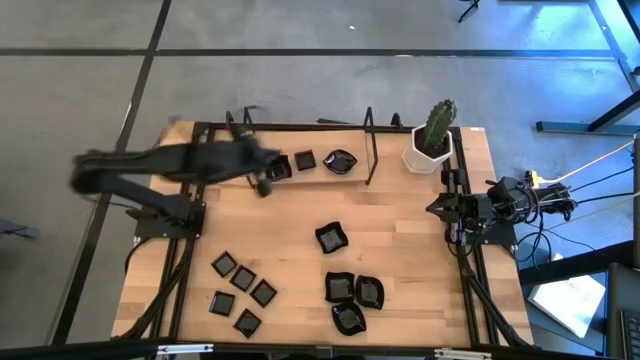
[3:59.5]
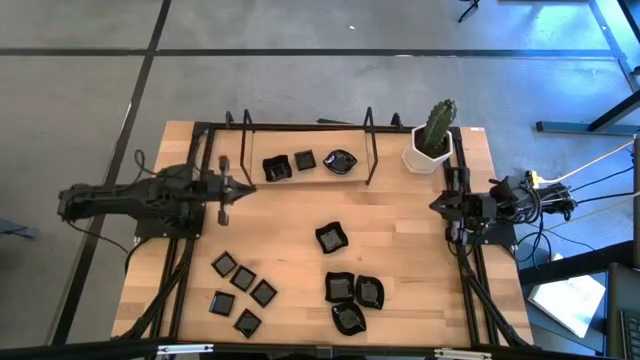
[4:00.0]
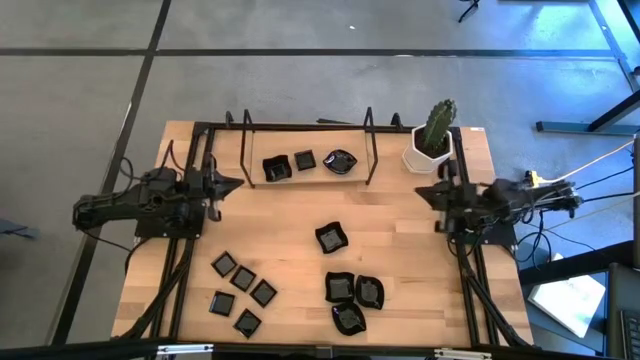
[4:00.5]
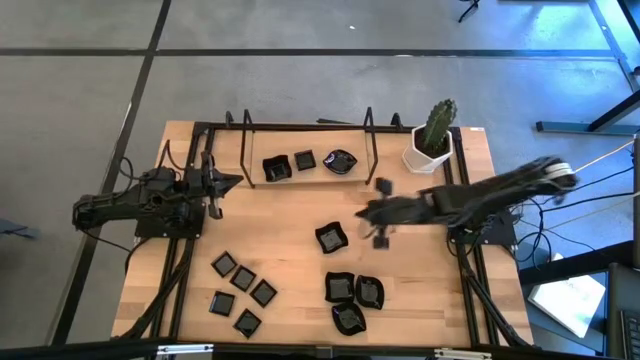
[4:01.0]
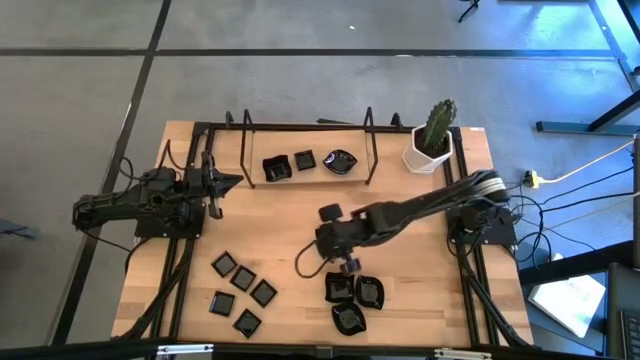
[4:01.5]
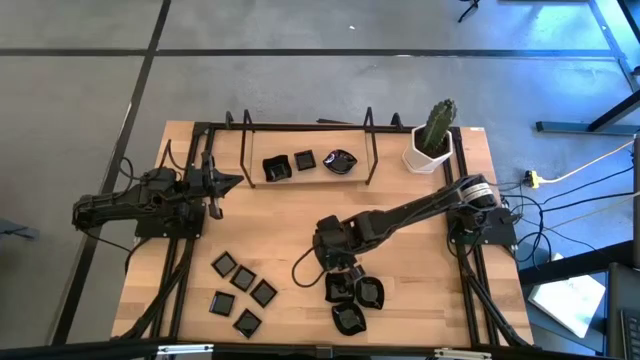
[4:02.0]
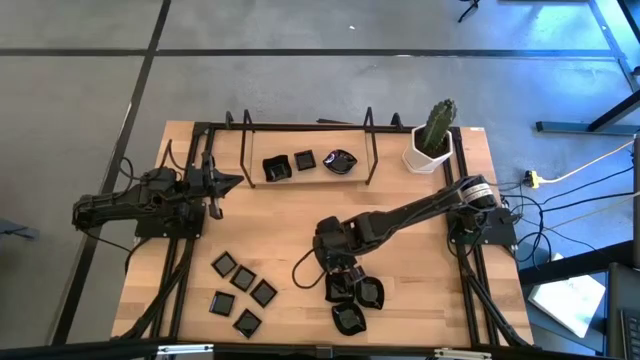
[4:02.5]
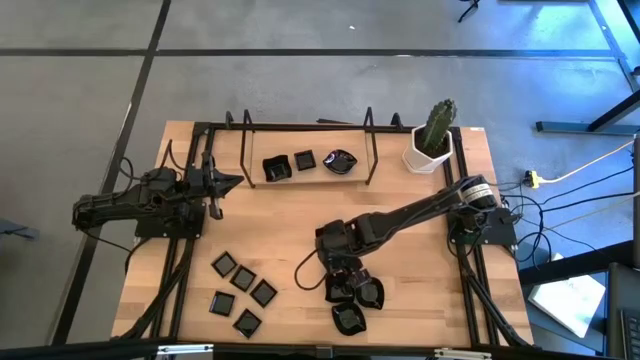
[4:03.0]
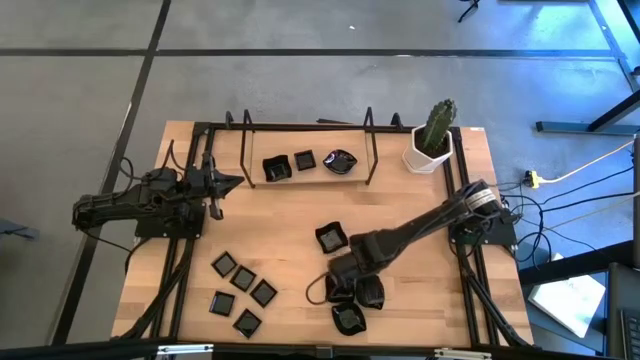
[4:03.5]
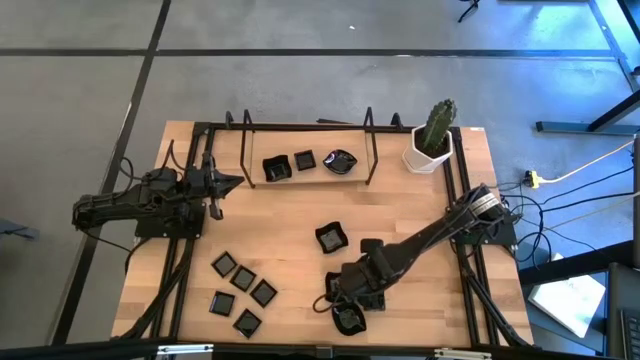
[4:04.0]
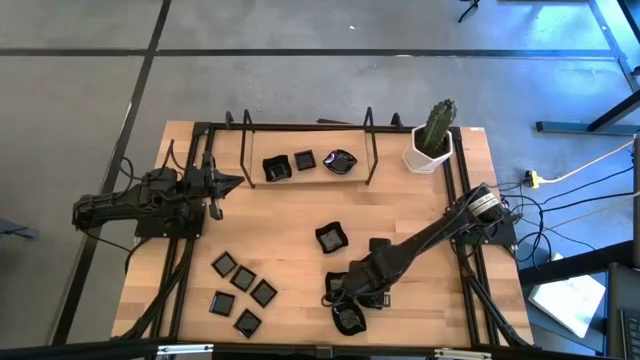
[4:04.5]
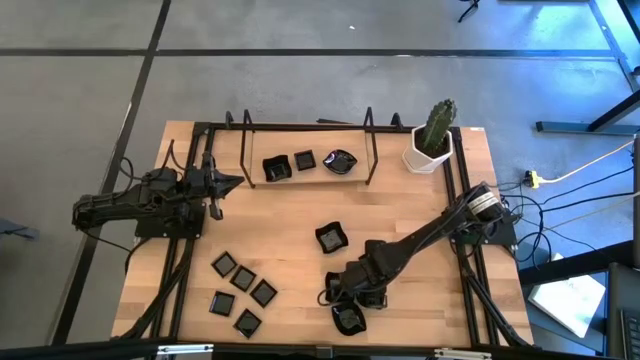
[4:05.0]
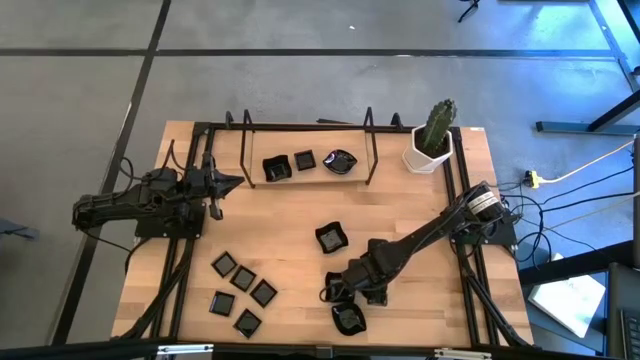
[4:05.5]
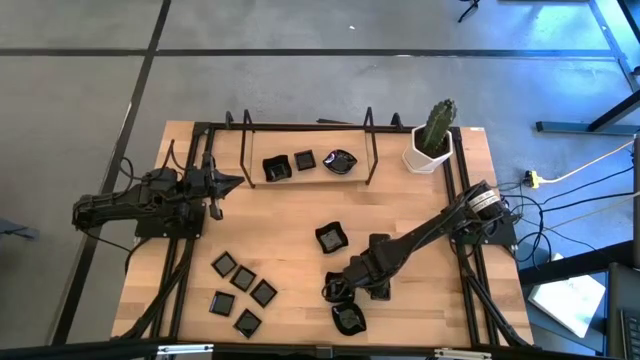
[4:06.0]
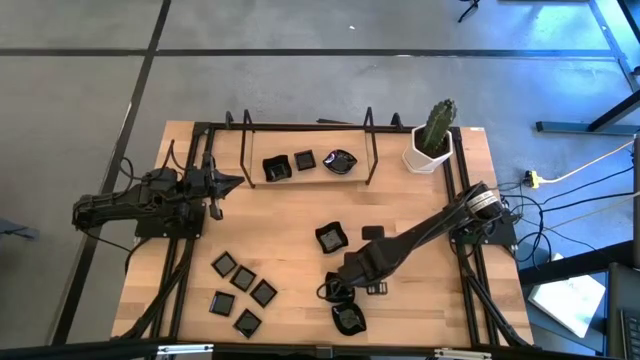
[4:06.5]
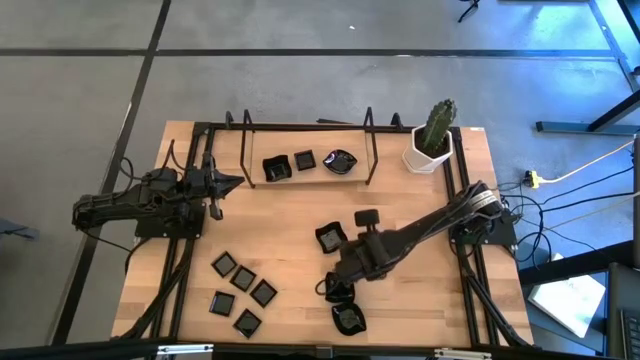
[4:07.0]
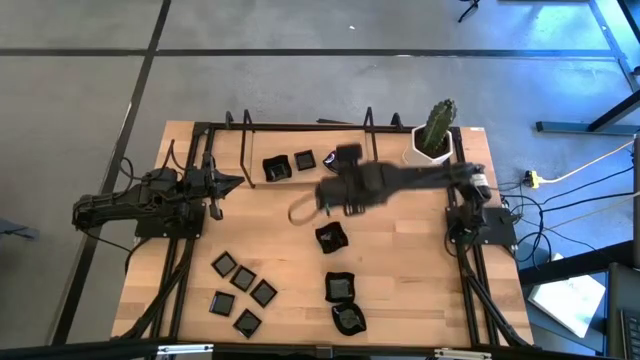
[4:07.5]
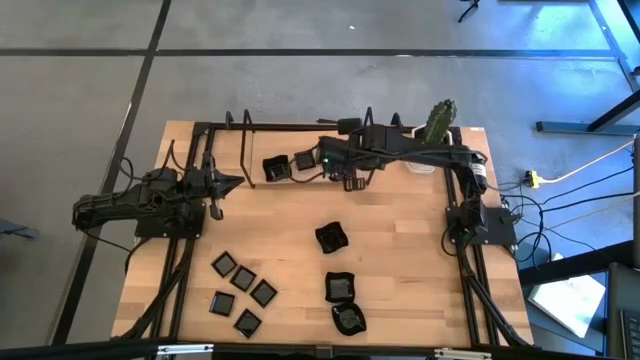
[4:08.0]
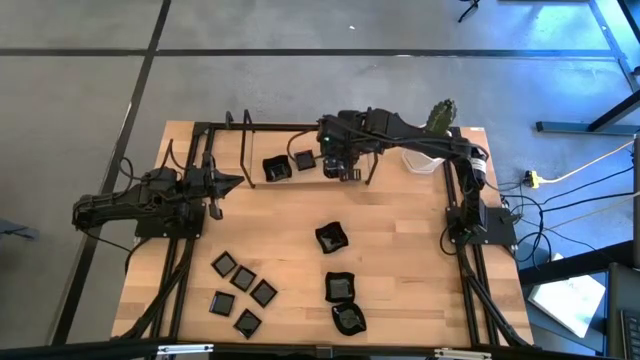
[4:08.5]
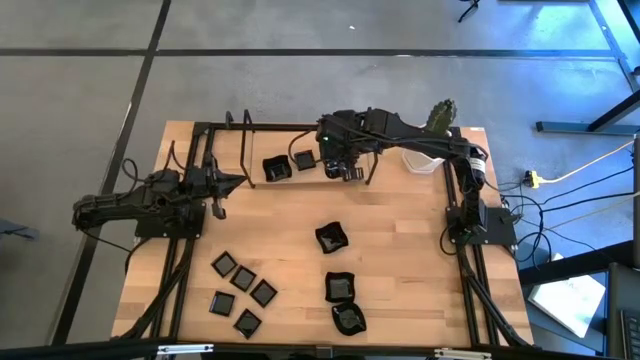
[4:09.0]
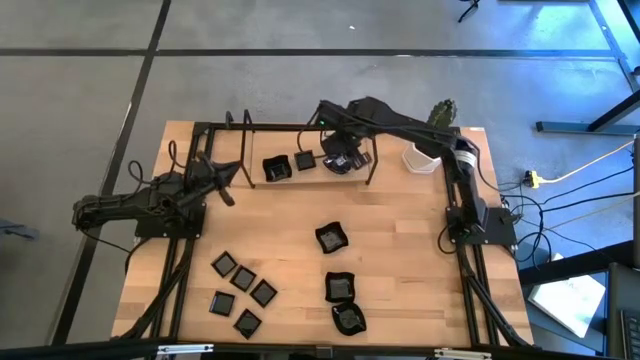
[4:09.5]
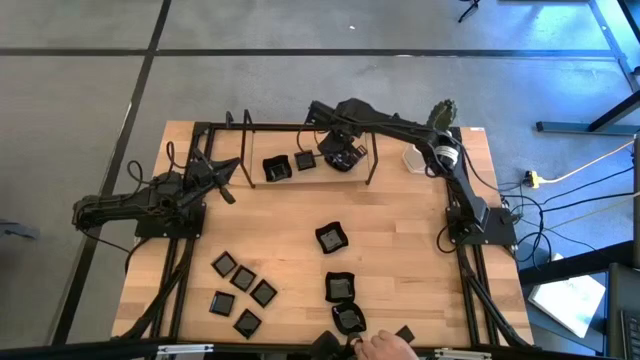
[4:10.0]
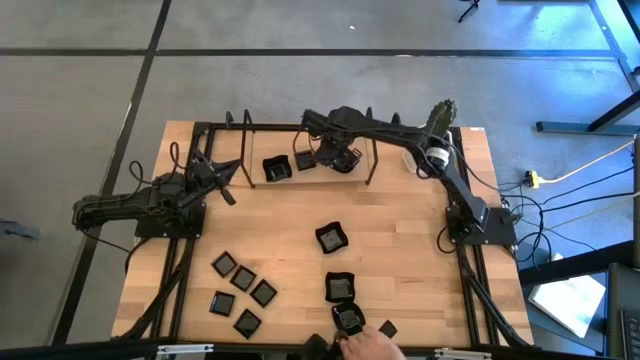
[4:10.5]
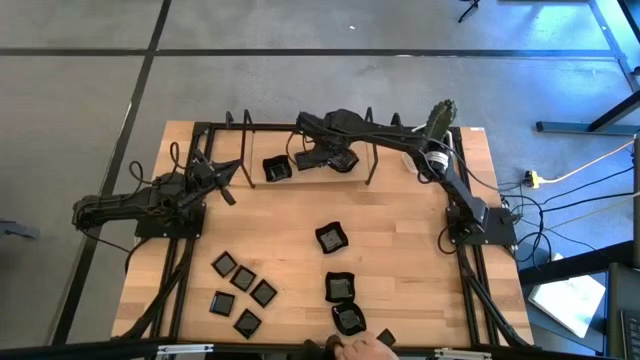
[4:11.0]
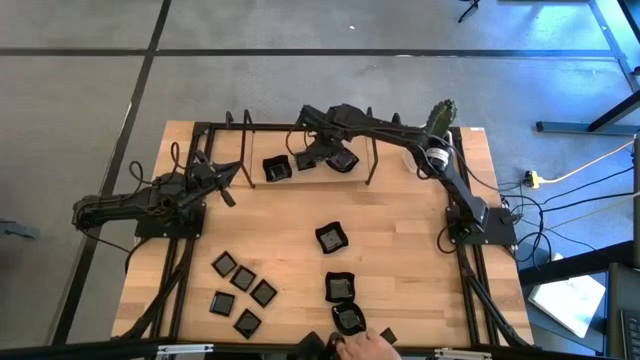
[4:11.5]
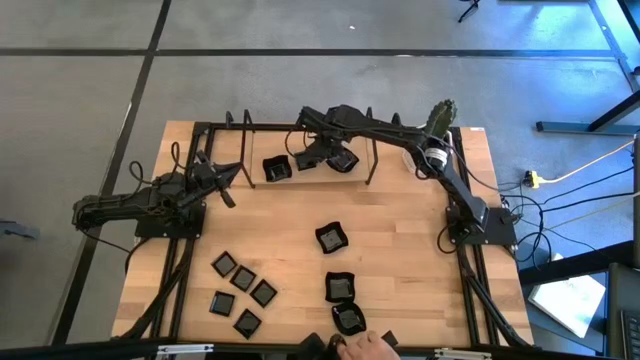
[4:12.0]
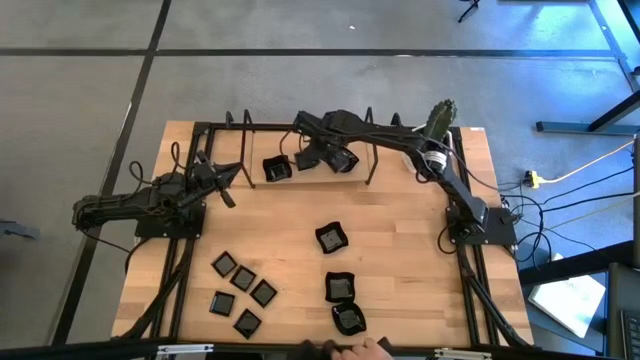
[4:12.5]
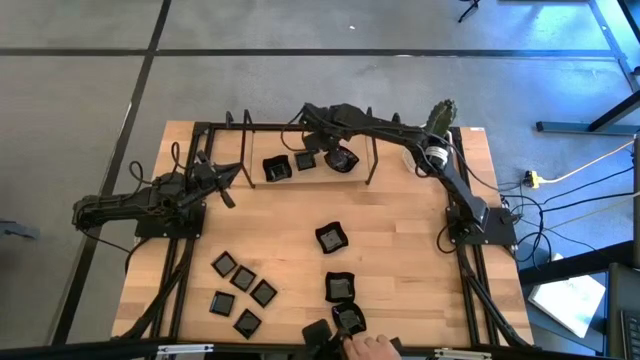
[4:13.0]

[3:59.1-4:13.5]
Task: Pick & Place Mini shaped plates
Stack the leaf-shaped plate on top of the leaf-shaped plate on the shelf

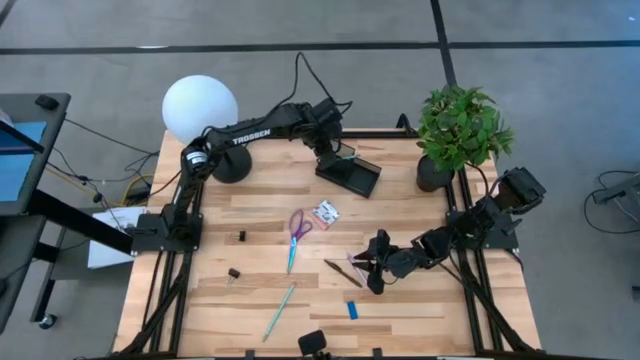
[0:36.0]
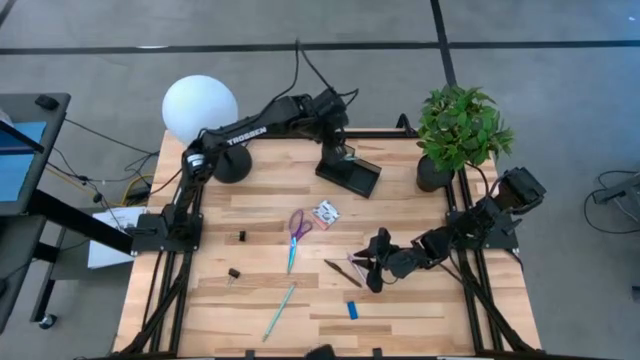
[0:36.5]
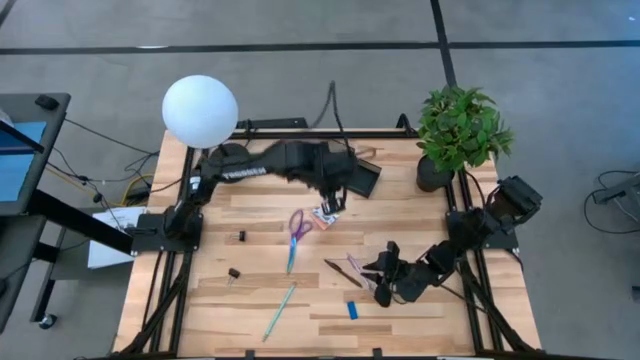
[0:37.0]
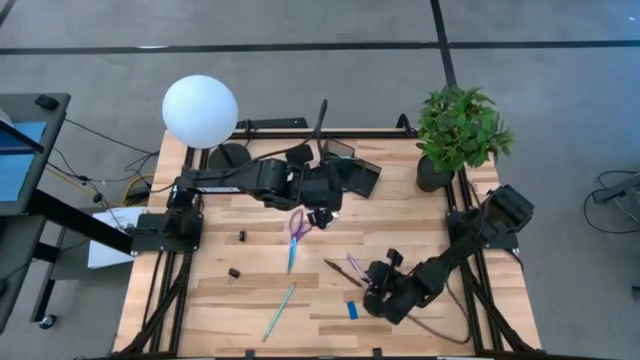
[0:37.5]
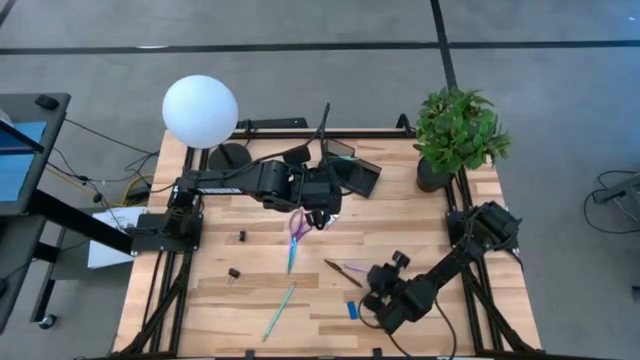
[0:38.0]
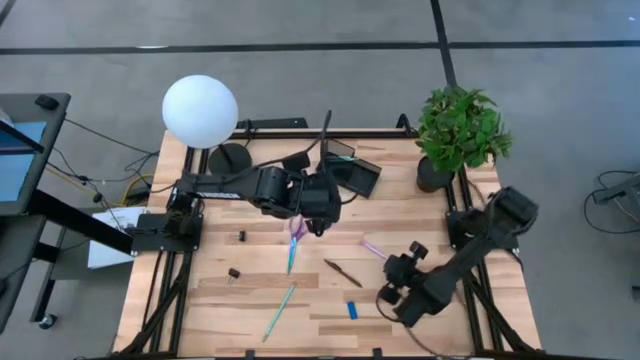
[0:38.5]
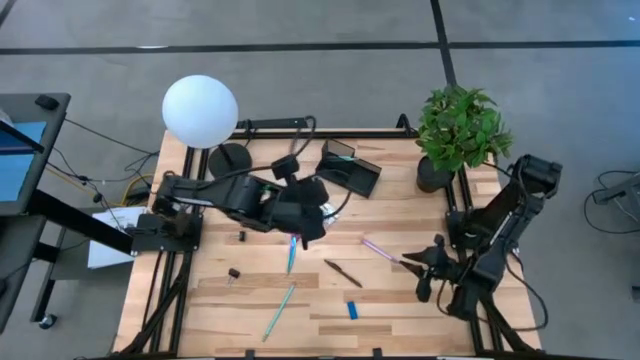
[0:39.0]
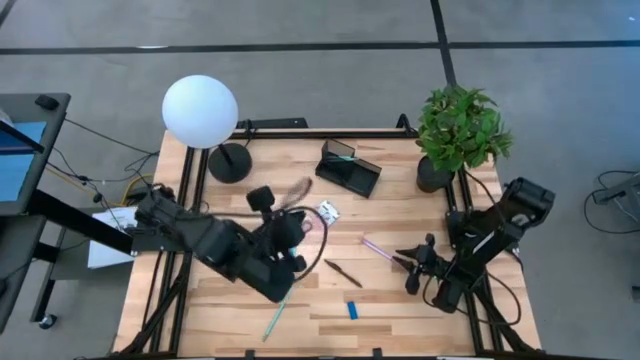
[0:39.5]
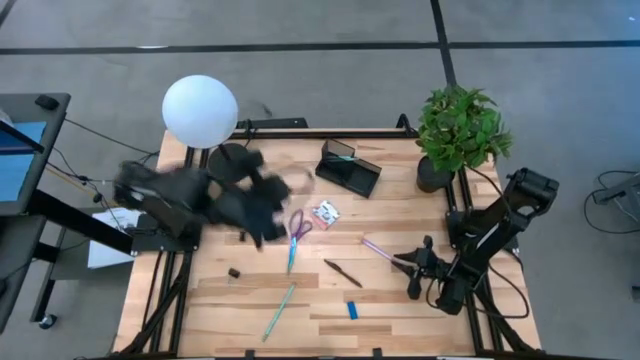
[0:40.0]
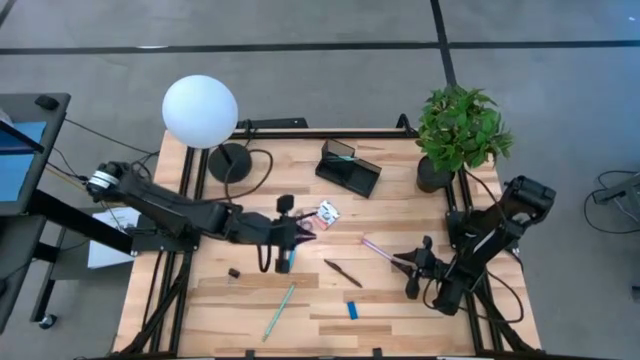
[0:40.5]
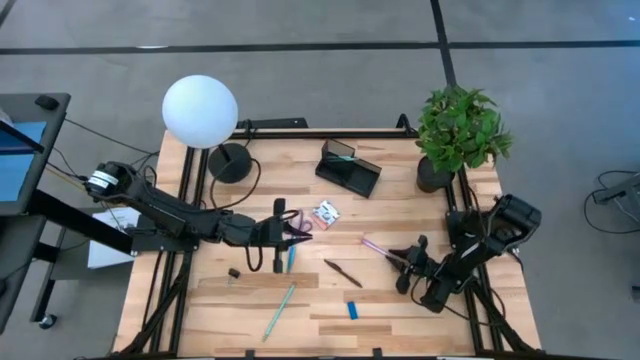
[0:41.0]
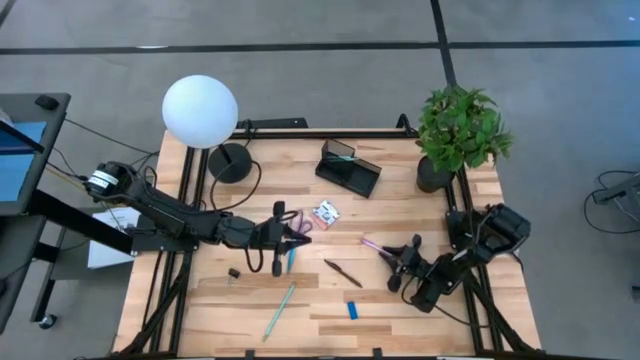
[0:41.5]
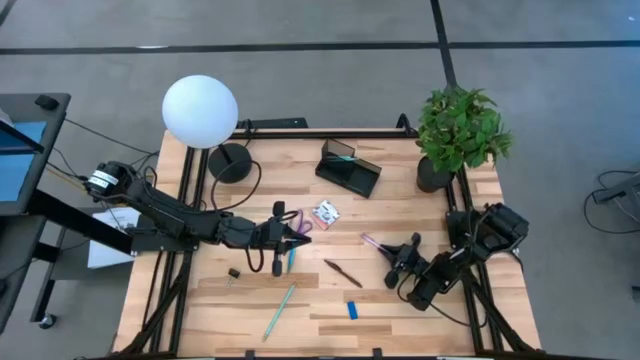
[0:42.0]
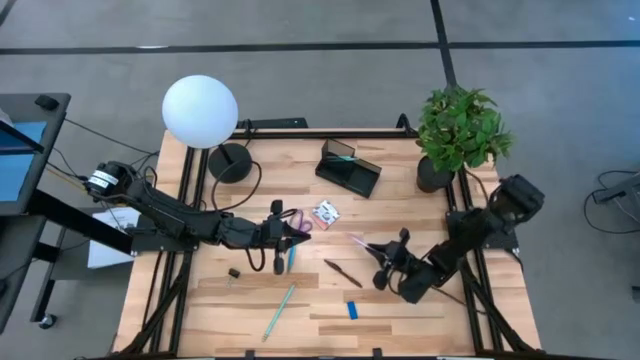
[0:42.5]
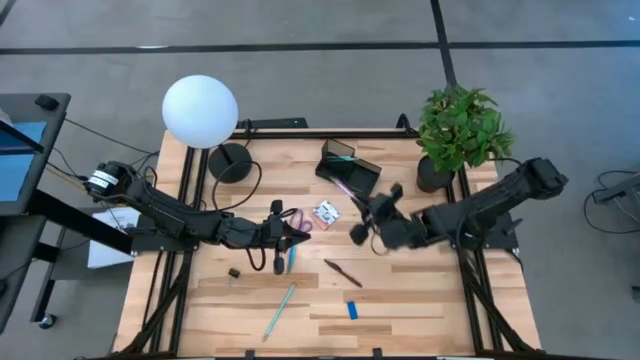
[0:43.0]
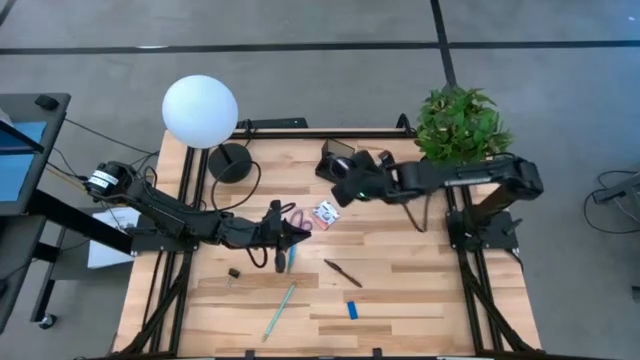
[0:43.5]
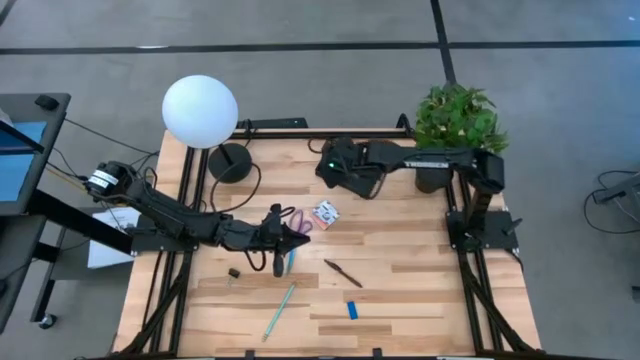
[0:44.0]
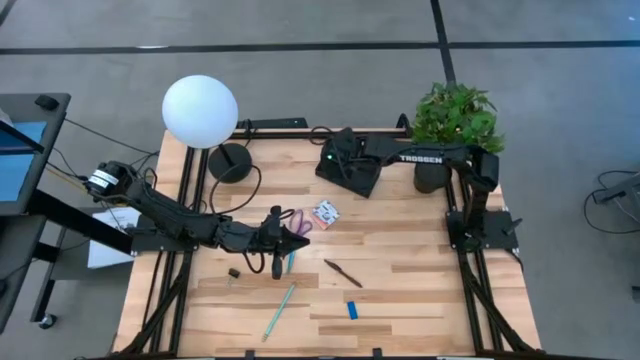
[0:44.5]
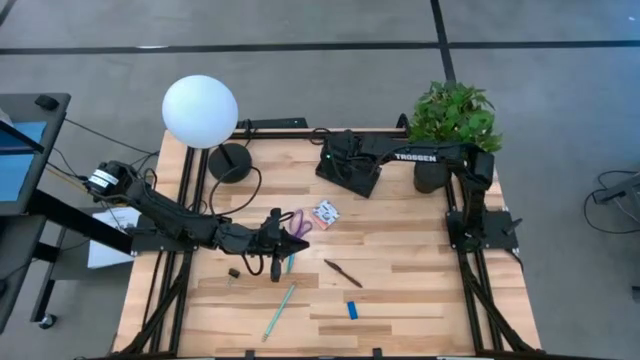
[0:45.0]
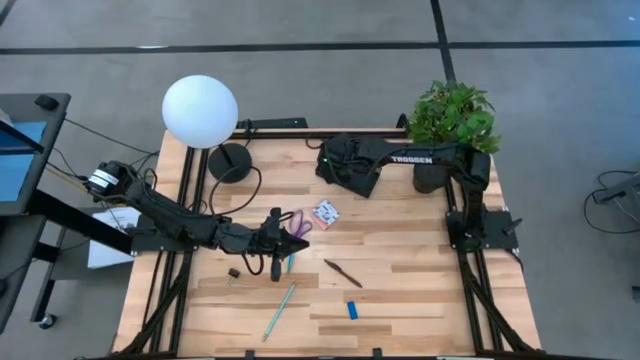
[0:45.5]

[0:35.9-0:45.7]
Task: Pick and place office supplies into organizer
Put the purple pen into the black desk organizer
